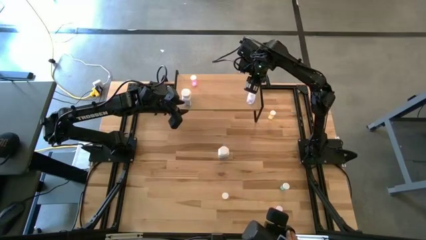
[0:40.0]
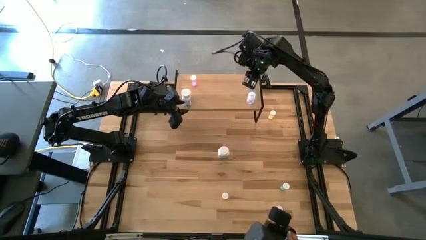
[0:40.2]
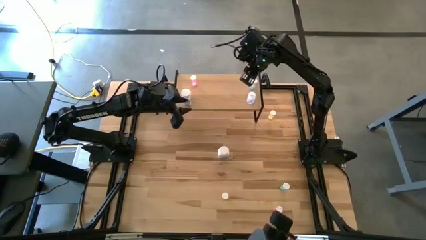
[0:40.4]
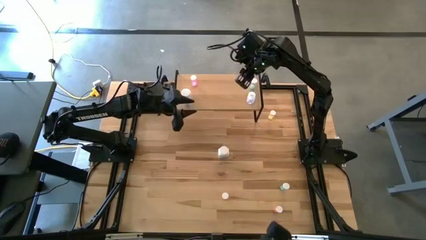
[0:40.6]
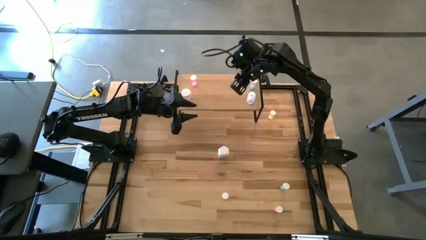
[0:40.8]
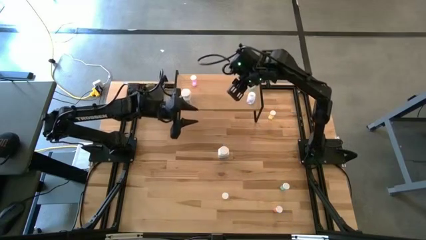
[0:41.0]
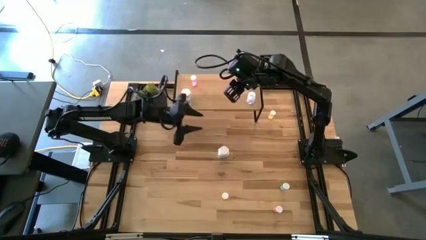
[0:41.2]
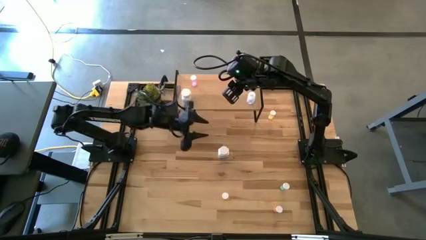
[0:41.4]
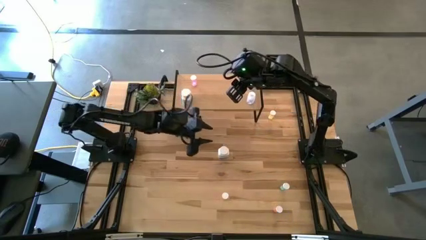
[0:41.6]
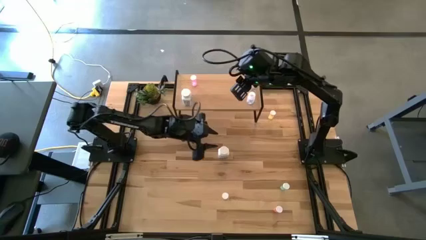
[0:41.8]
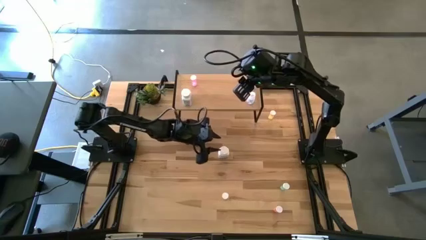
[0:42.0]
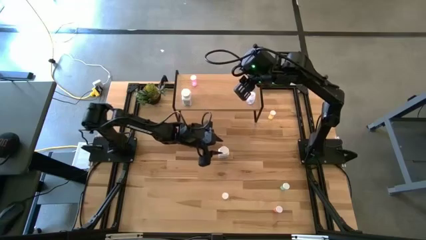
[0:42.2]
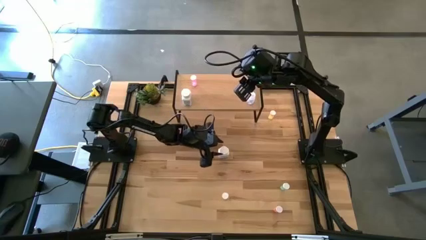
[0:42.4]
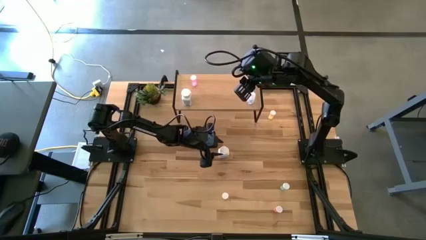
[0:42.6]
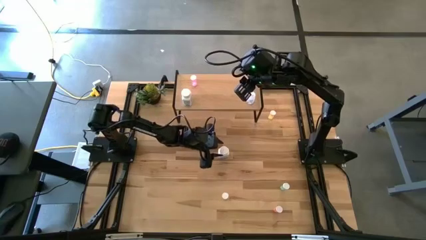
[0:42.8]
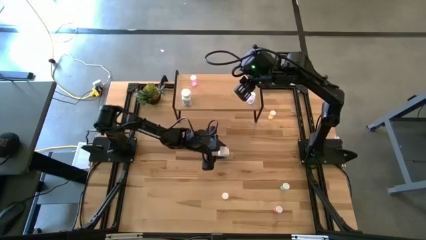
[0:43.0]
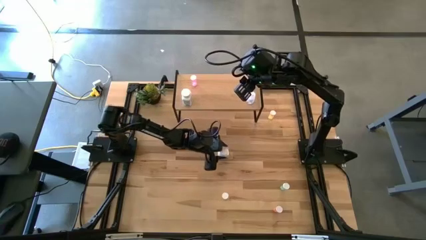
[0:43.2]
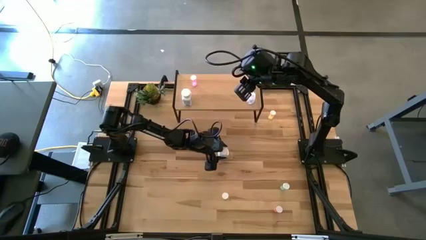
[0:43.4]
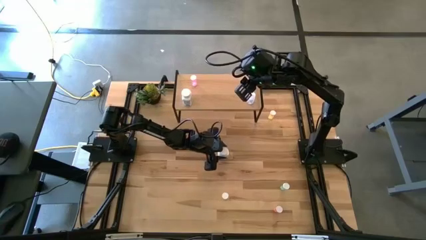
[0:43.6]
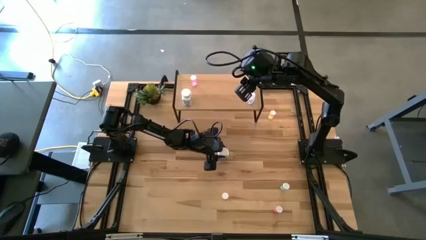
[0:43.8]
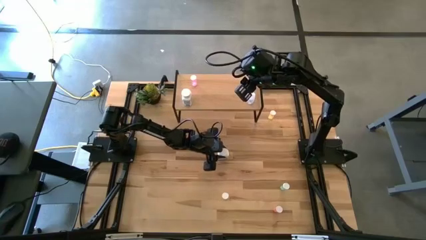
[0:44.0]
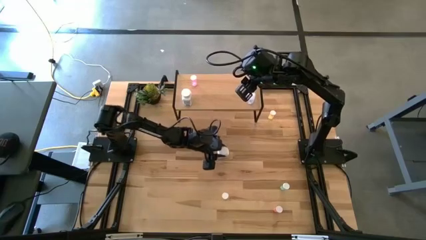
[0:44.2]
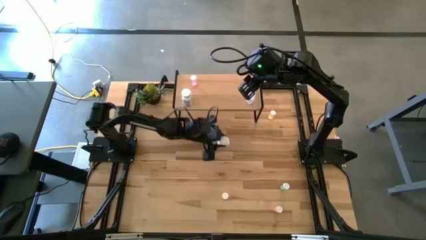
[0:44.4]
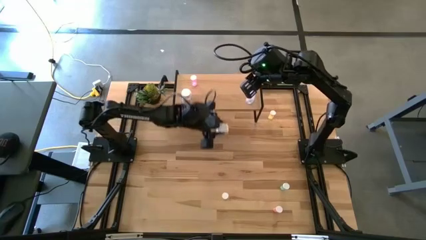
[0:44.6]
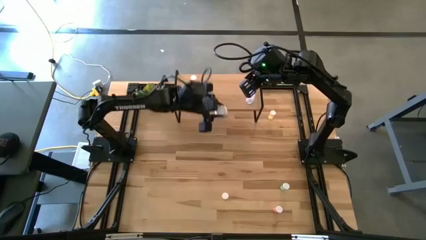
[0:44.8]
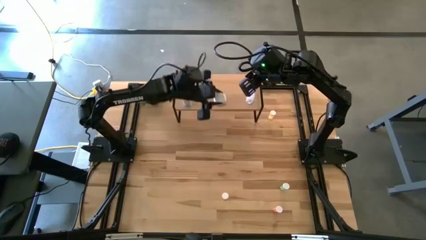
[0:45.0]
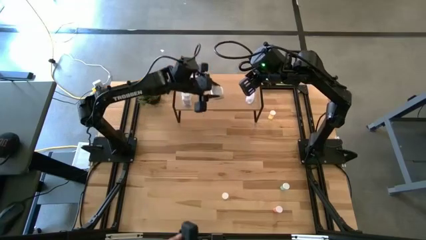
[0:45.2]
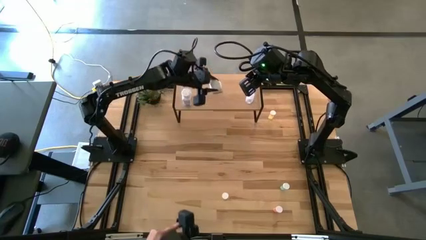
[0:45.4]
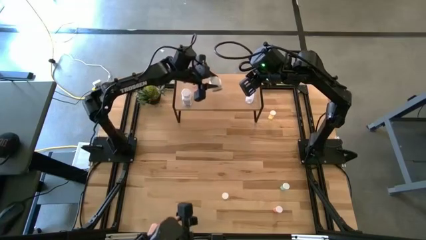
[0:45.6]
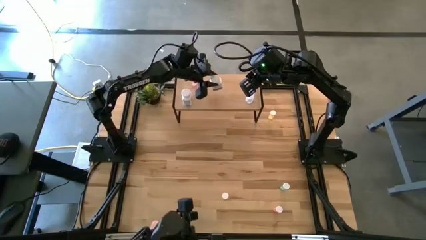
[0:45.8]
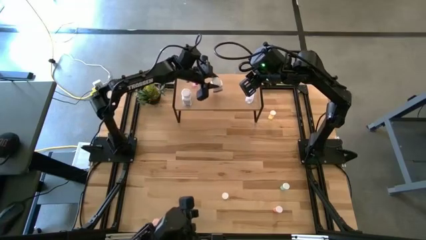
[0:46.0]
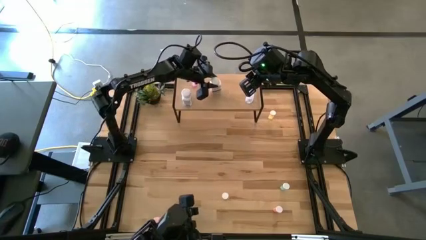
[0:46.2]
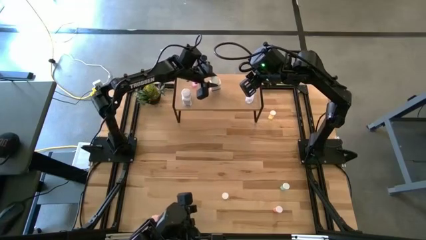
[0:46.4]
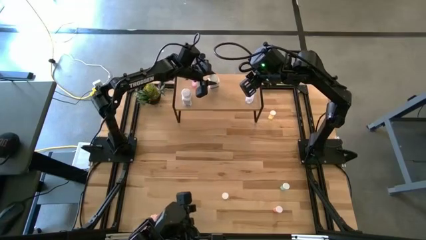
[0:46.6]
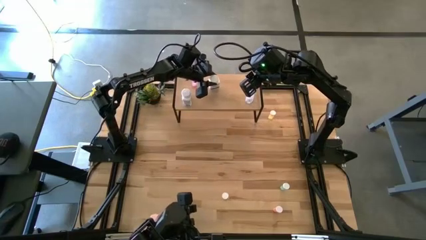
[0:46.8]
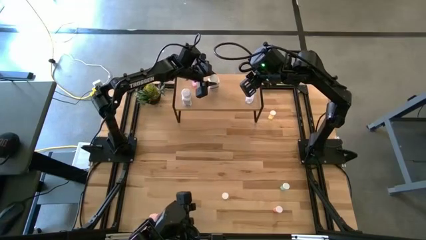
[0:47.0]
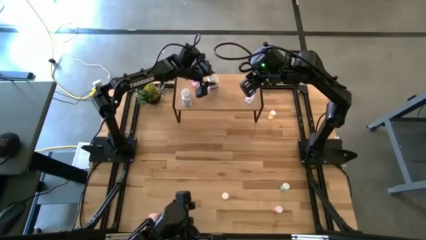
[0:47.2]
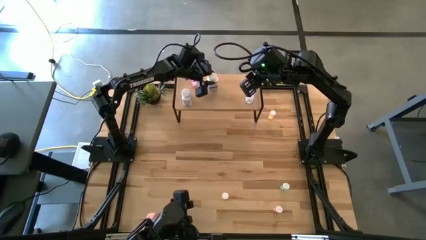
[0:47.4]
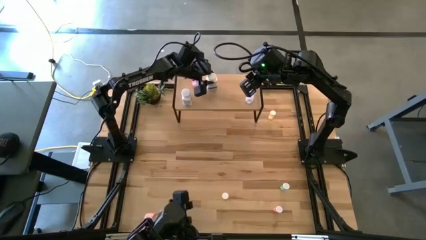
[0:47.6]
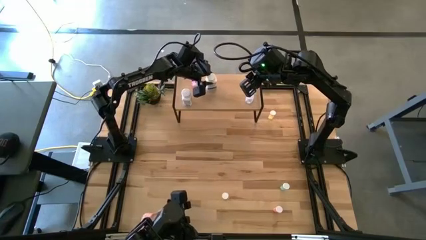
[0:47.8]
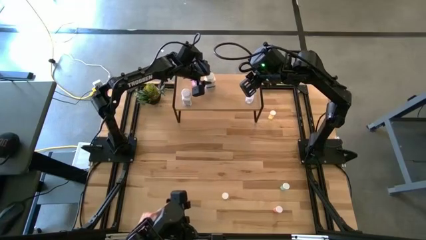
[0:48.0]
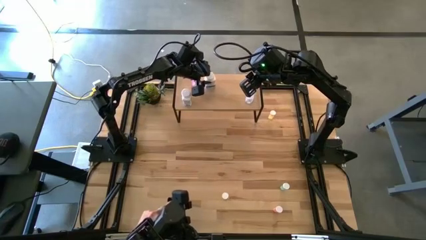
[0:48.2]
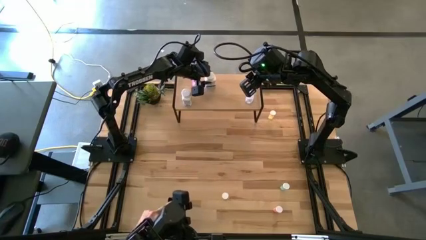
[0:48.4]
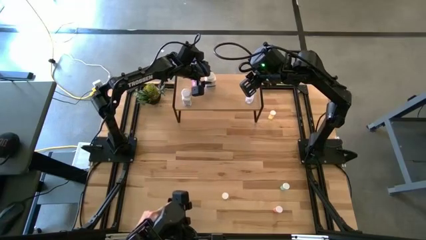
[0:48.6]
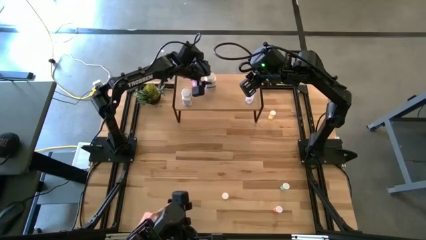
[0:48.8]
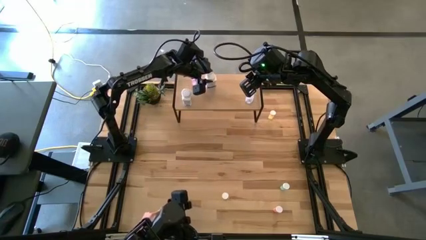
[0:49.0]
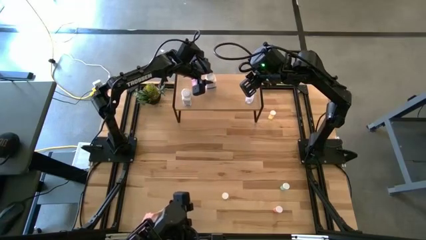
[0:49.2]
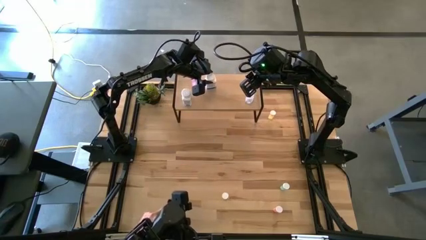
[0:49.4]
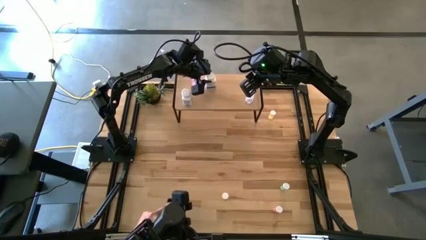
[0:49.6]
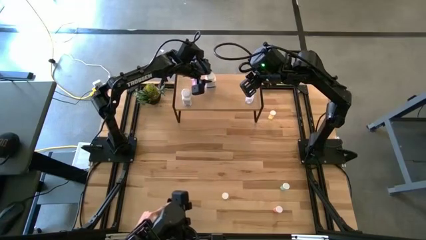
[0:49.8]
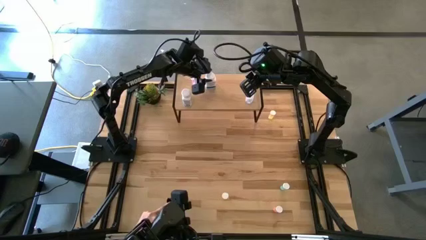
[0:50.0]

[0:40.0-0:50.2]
Task: Pick and place medicine bottles onto shelf by color
Put the blue pill bottle on the shelf

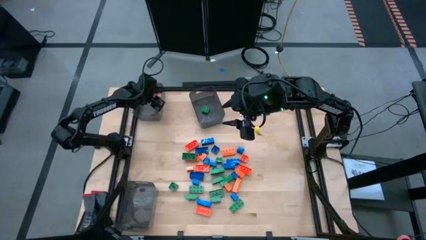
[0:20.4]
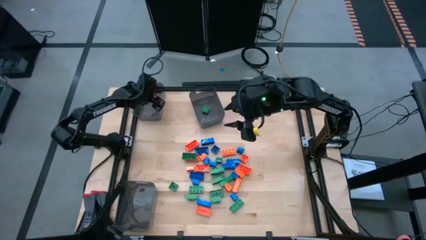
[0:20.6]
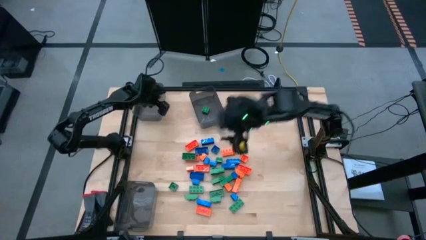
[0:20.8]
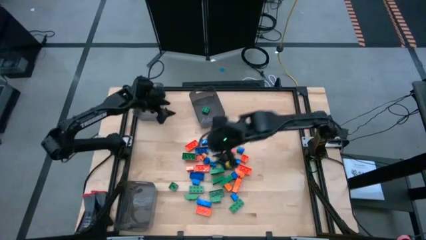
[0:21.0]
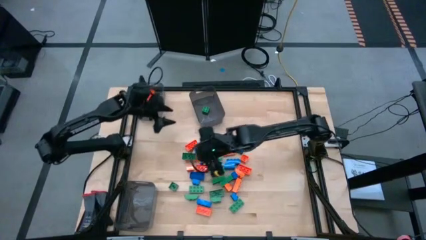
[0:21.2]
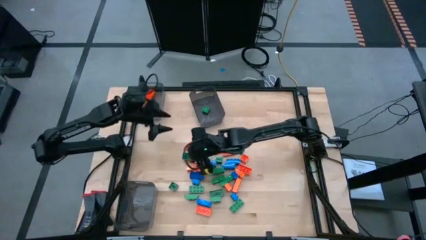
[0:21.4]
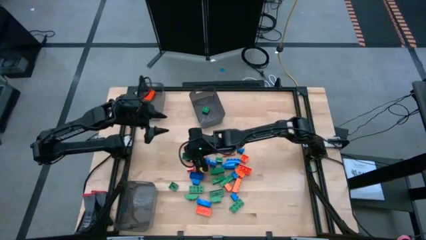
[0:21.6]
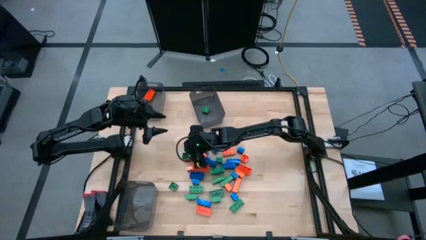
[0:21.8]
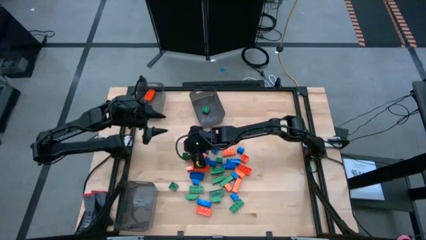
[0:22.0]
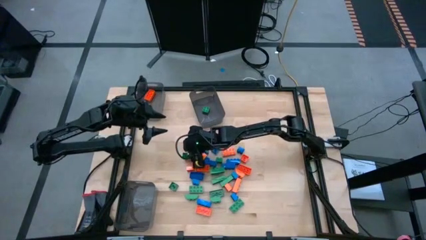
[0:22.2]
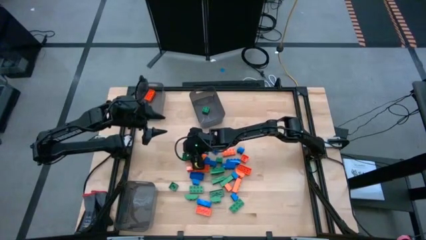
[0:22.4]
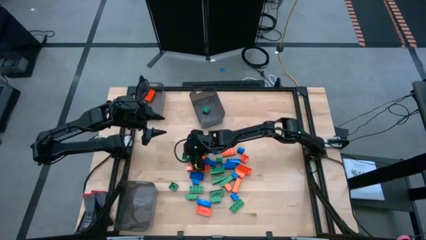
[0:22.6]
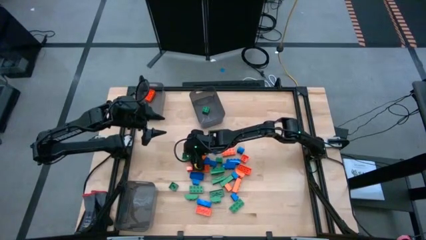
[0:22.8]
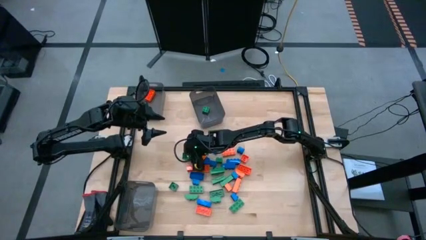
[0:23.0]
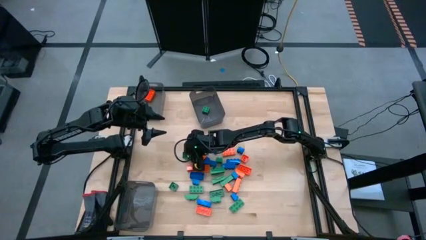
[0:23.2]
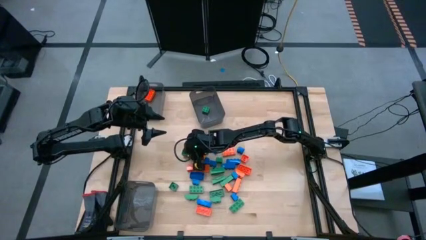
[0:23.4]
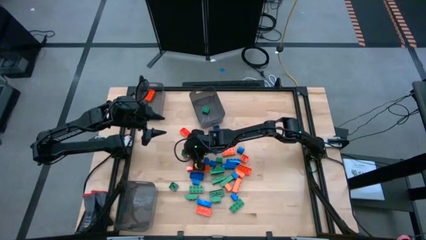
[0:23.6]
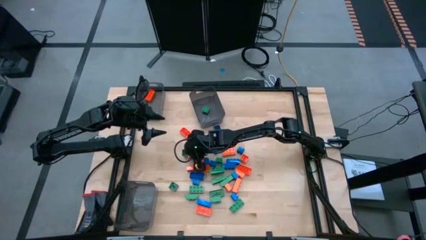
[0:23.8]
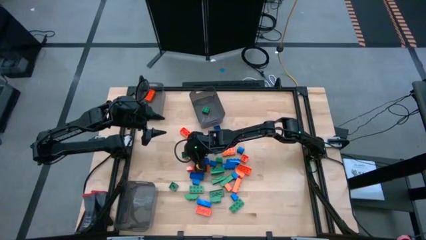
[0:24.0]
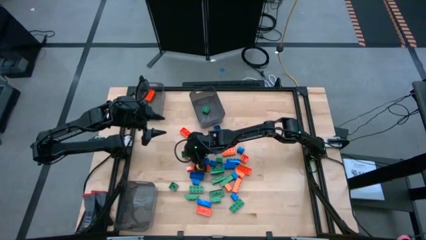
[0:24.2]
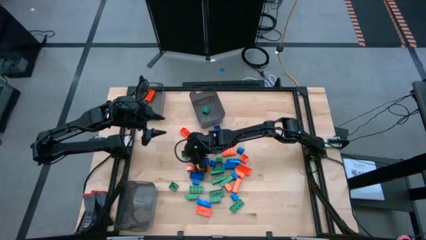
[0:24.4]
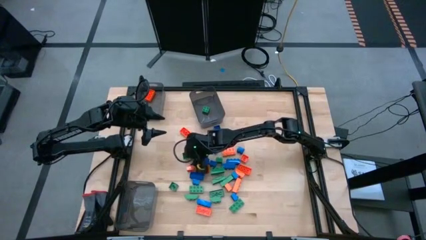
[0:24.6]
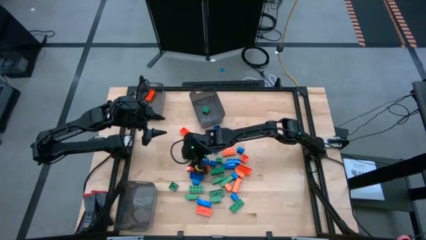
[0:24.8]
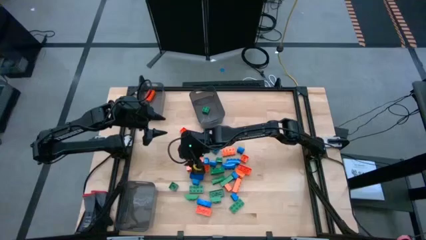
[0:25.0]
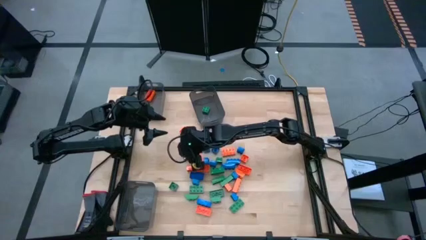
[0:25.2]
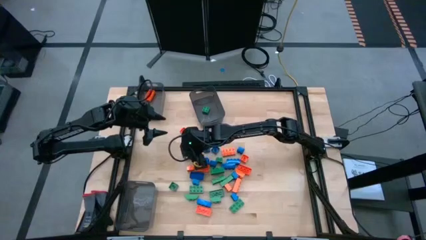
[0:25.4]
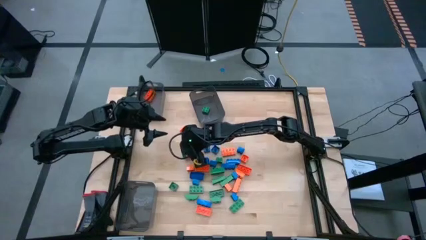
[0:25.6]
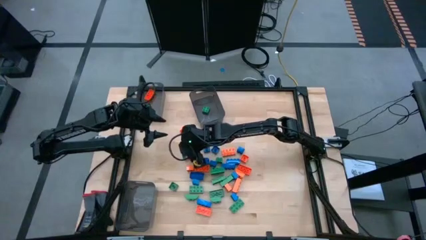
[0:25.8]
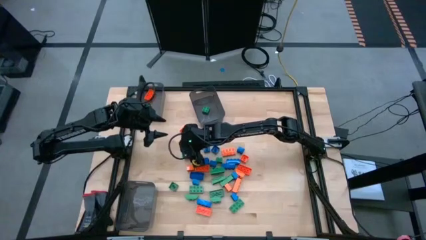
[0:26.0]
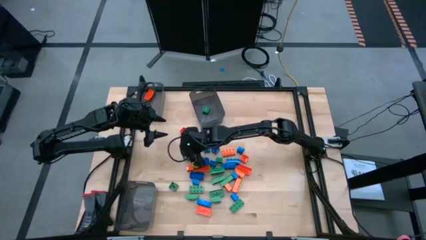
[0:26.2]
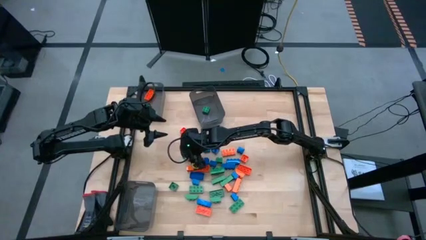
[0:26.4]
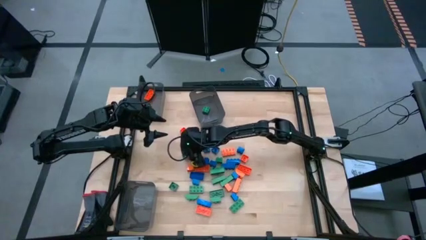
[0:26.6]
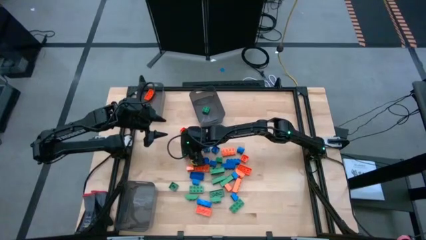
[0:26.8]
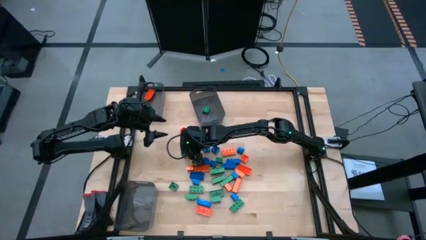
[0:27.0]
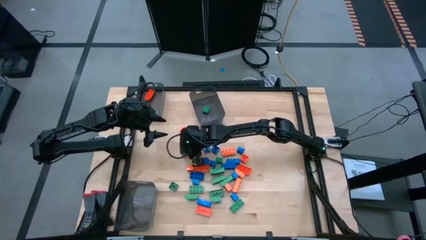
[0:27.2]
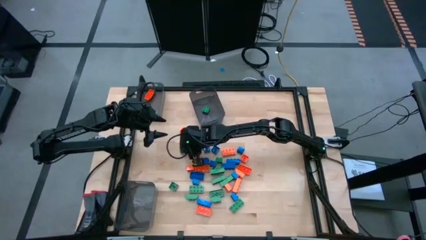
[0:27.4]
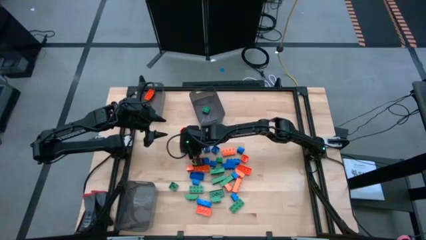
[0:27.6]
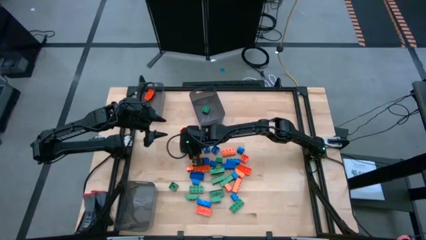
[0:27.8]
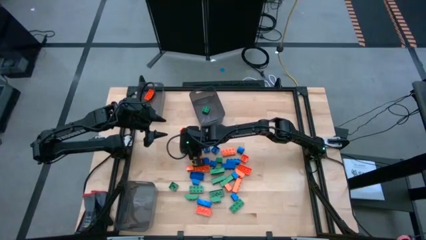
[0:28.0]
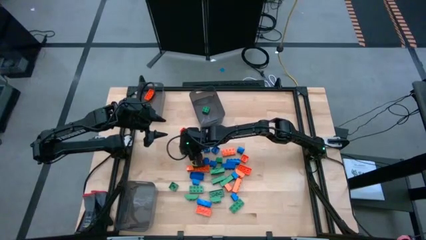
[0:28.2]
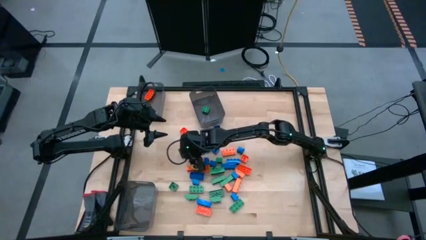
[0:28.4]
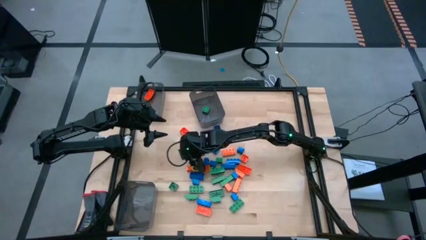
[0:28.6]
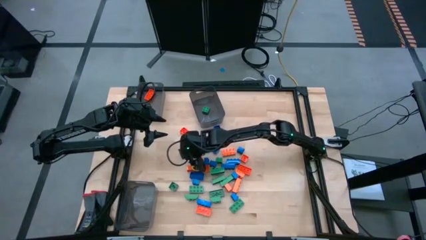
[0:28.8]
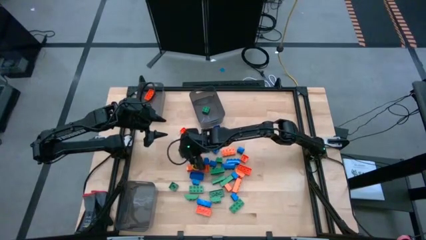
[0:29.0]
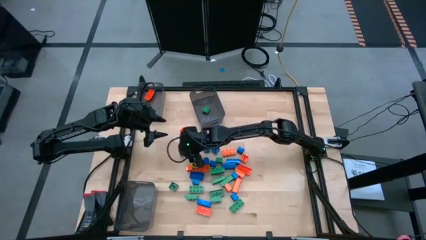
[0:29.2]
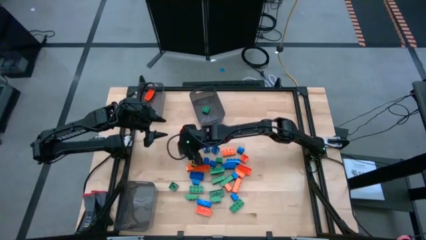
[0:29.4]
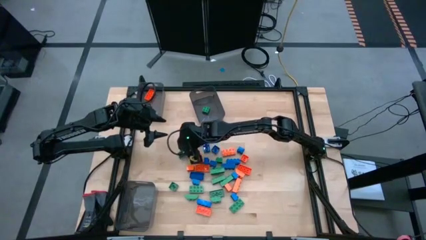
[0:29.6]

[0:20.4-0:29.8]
Task: Sort blocks
Put the green game piece into the top right black transparent bin
